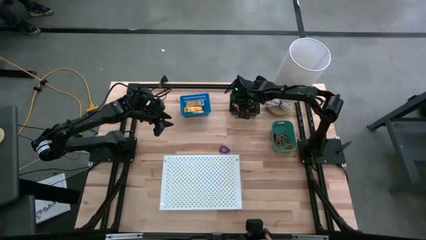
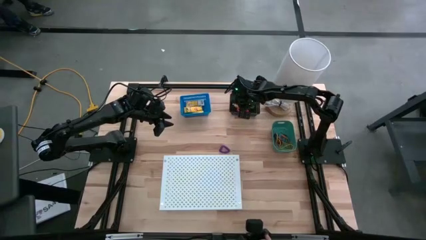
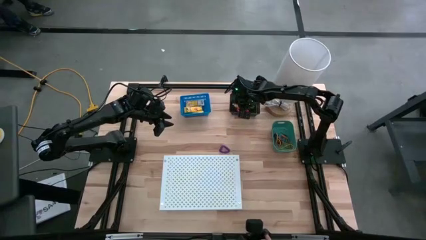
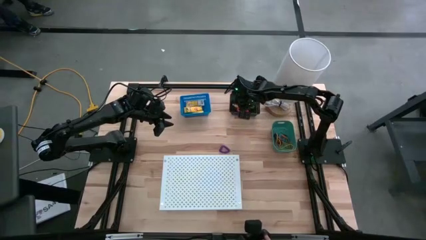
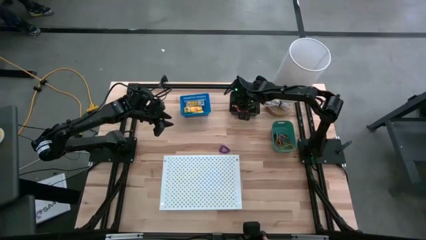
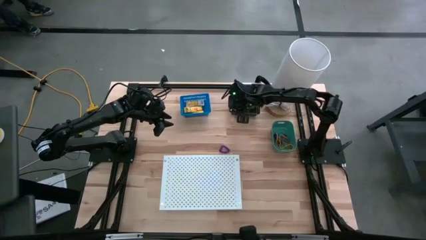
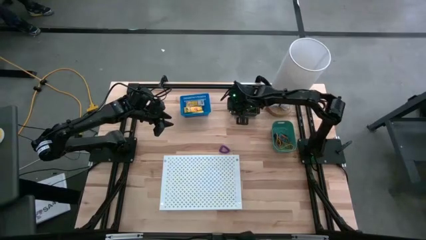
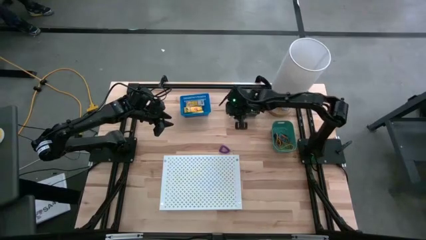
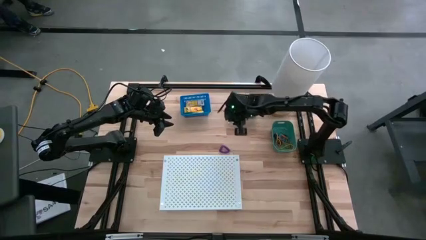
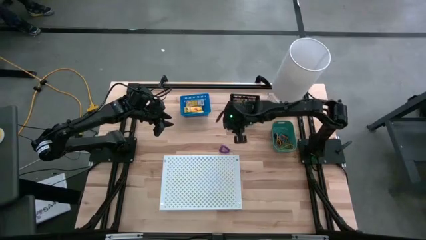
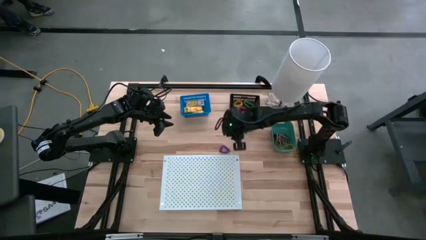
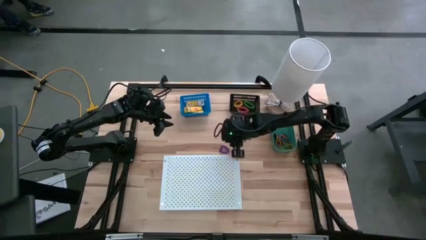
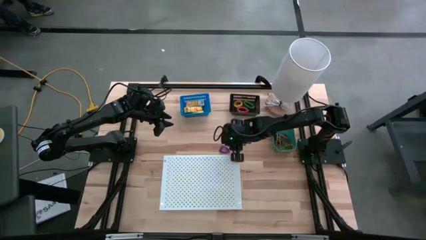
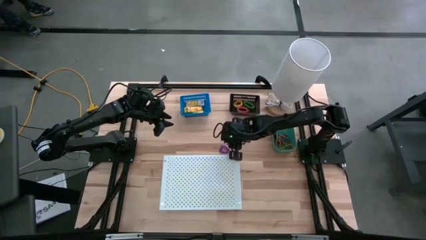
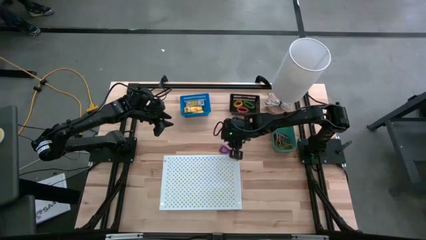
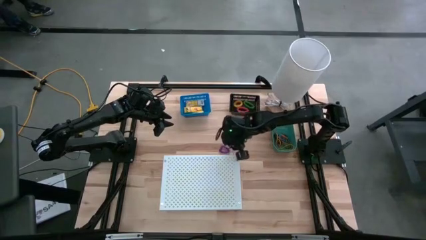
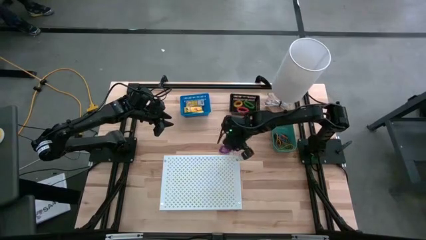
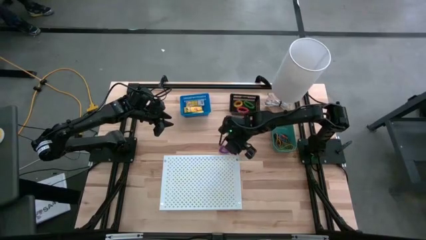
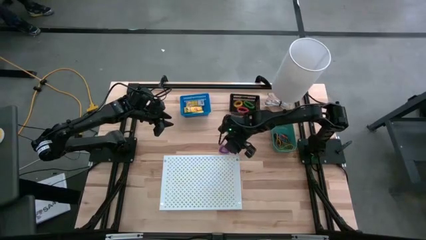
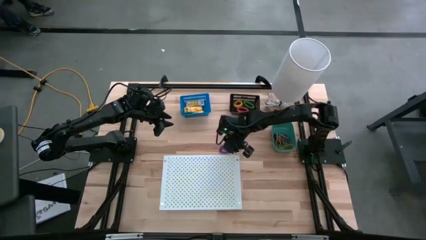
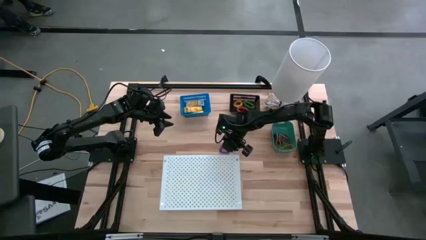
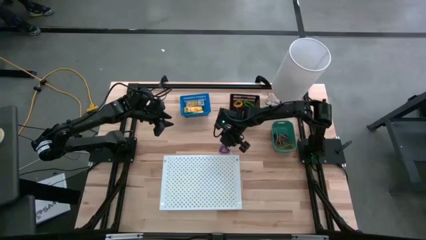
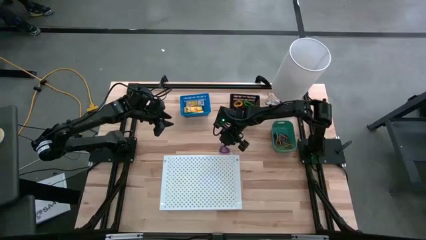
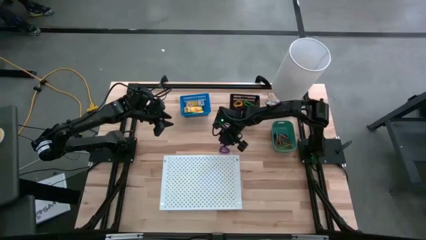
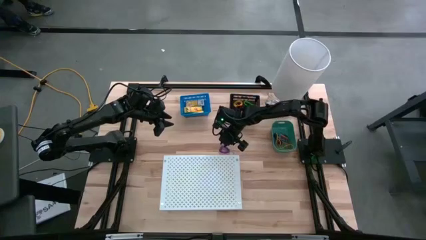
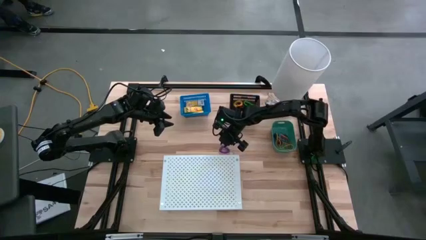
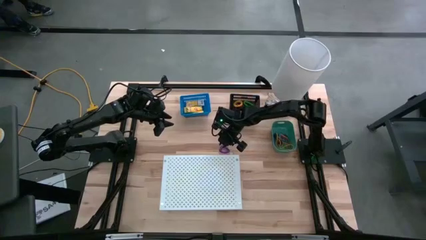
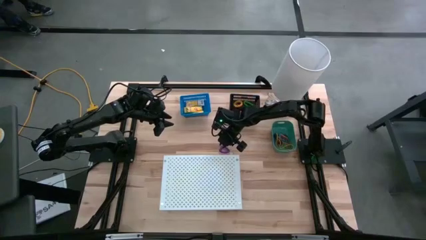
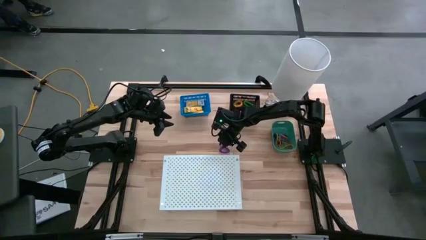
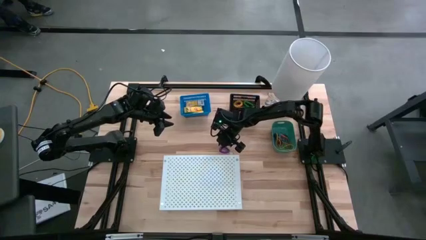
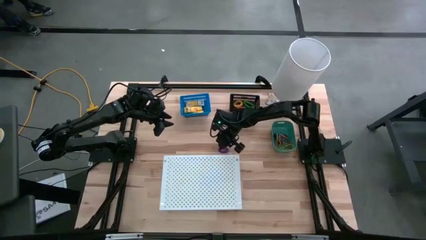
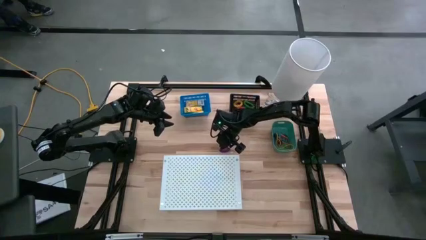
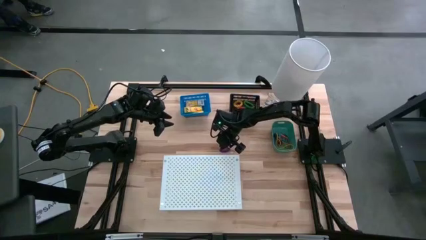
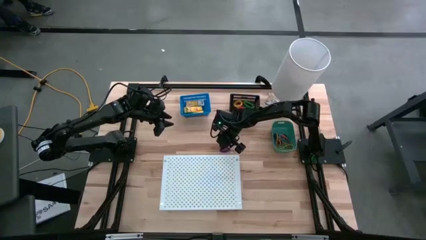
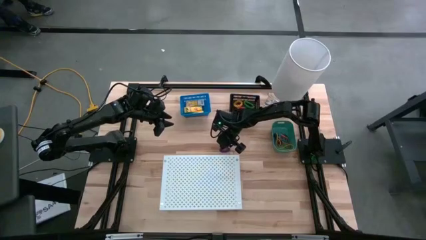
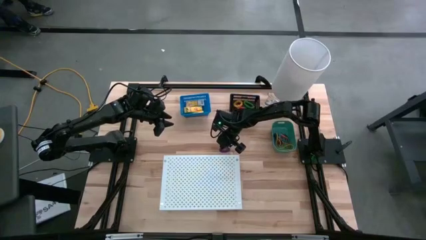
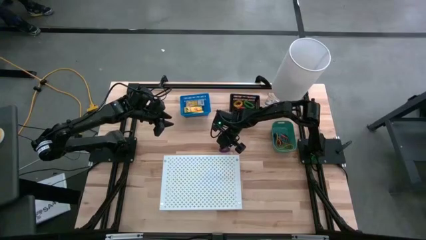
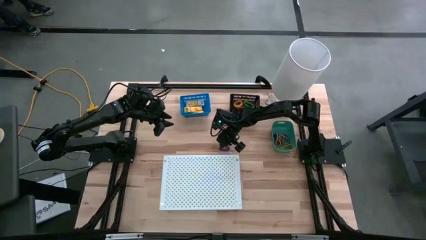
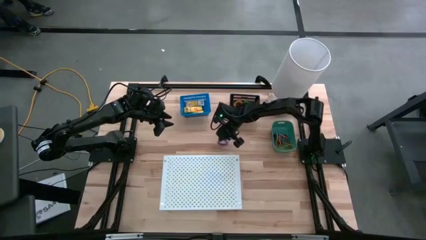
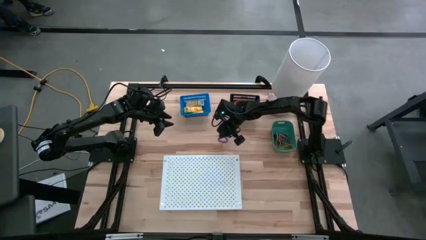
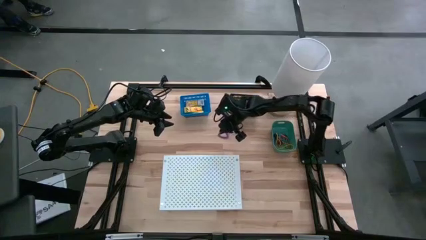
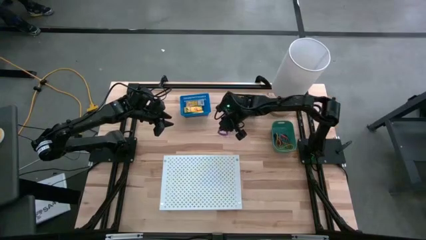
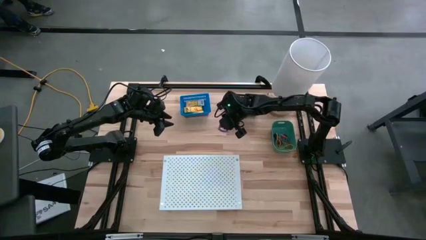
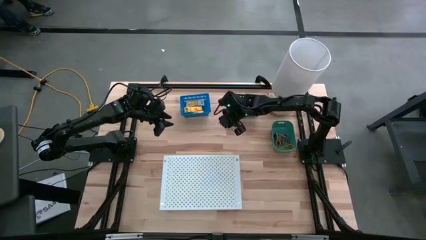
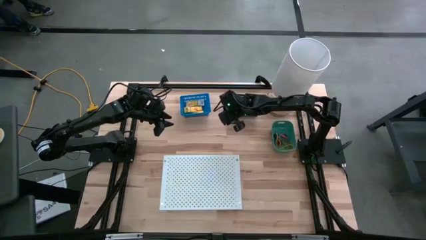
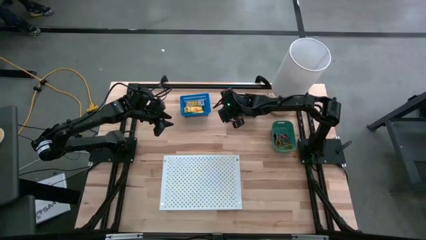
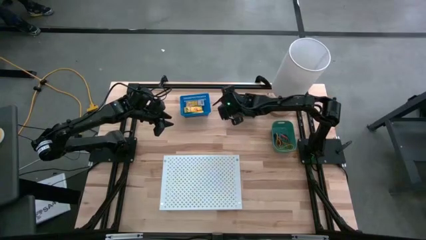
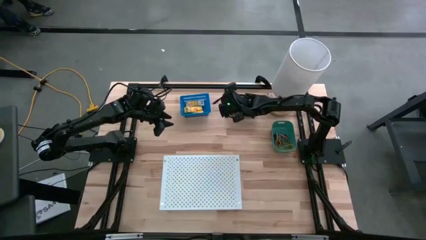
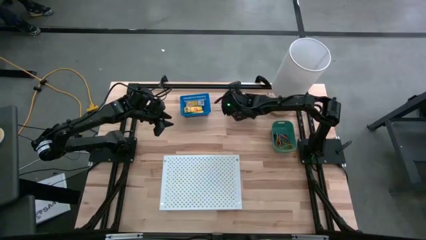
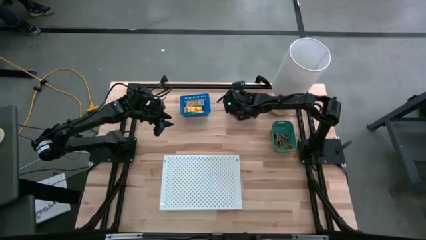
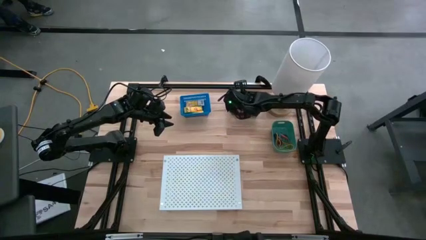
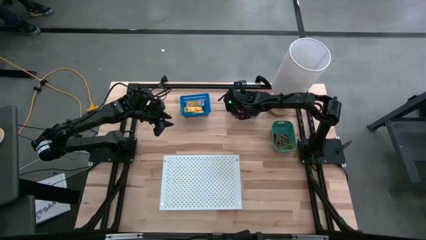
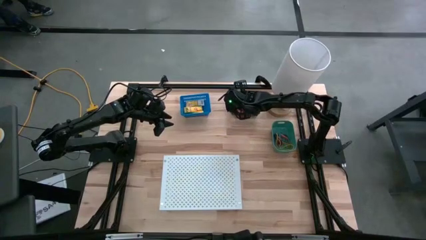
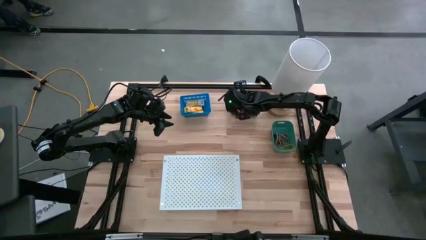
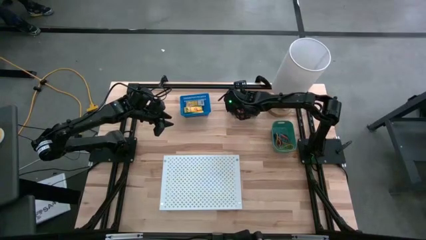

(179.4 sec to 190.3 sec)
Task: Pick & Place Office Desk Supplies
Put the violet spring keychain into the black bin
